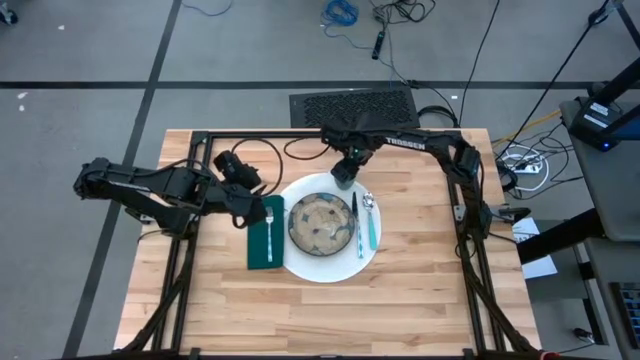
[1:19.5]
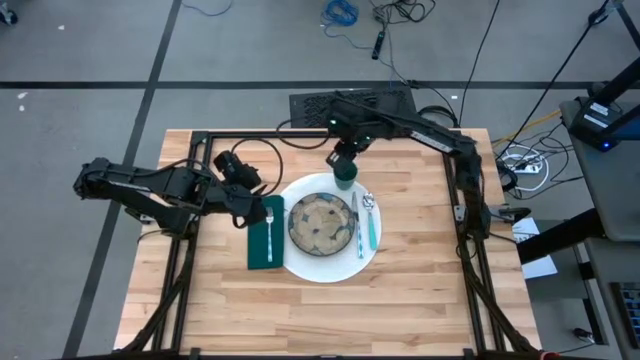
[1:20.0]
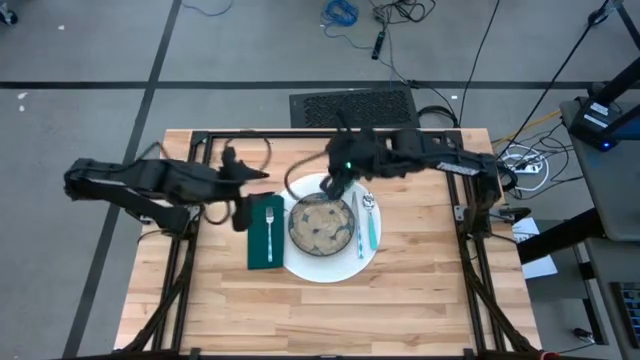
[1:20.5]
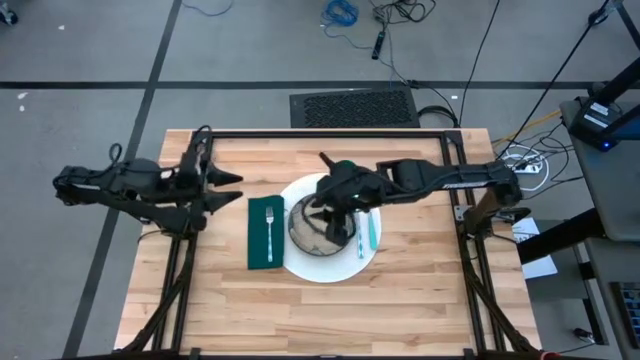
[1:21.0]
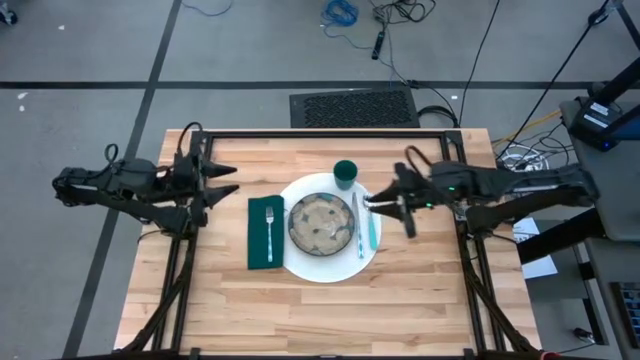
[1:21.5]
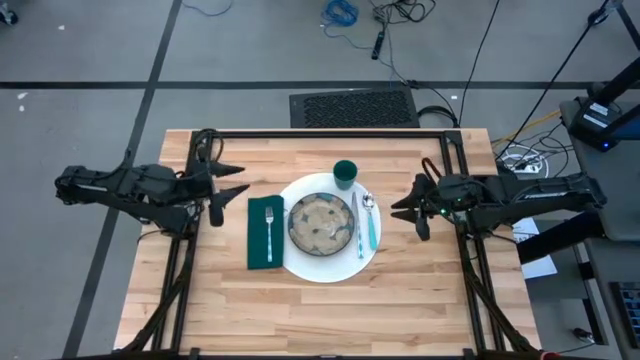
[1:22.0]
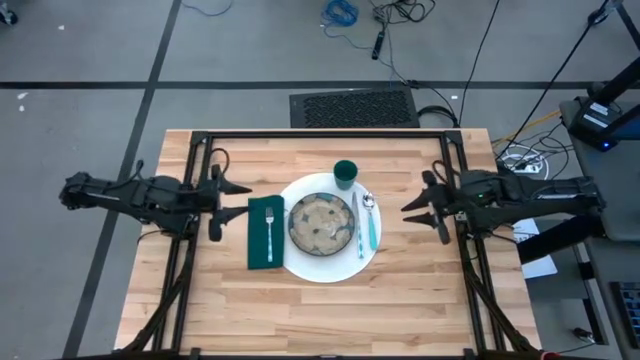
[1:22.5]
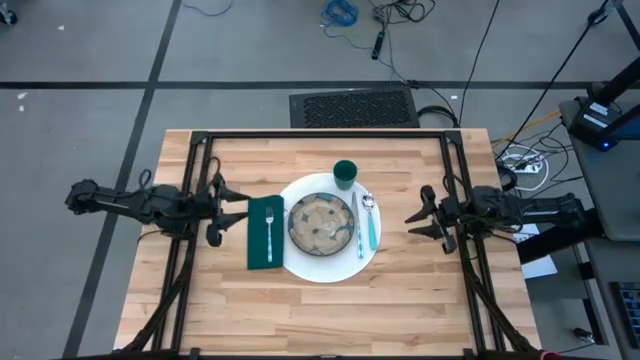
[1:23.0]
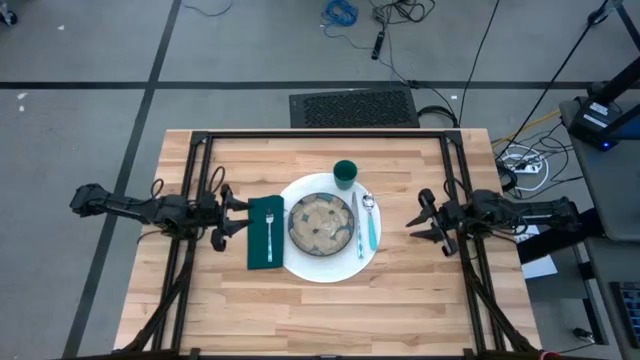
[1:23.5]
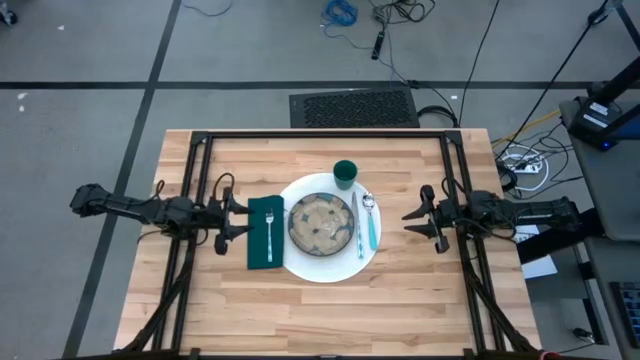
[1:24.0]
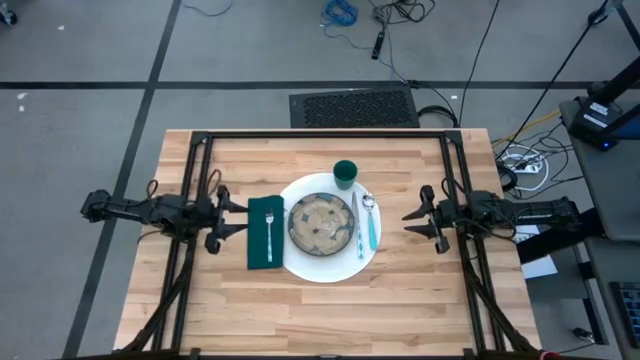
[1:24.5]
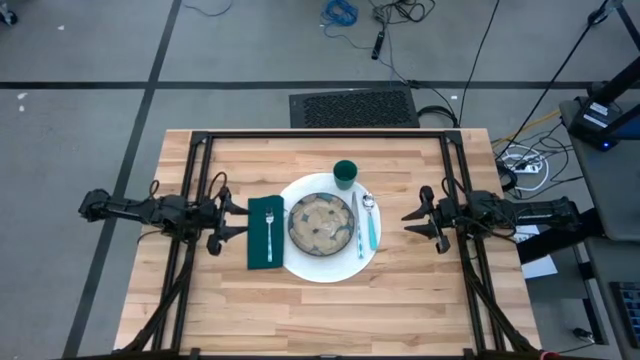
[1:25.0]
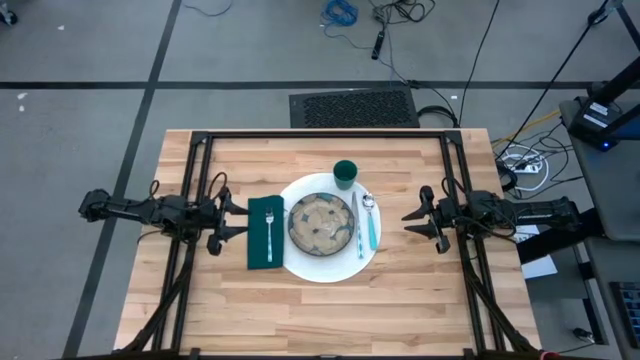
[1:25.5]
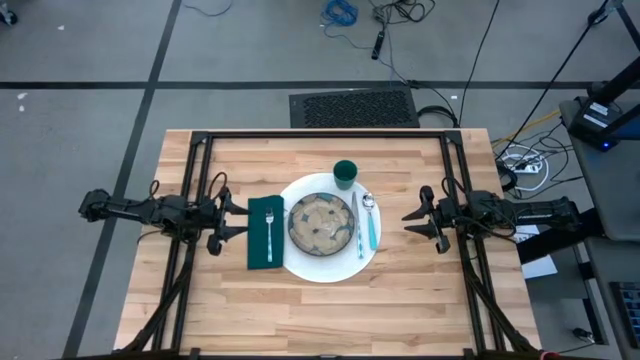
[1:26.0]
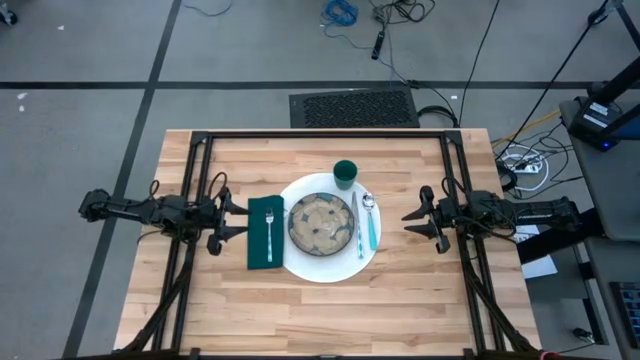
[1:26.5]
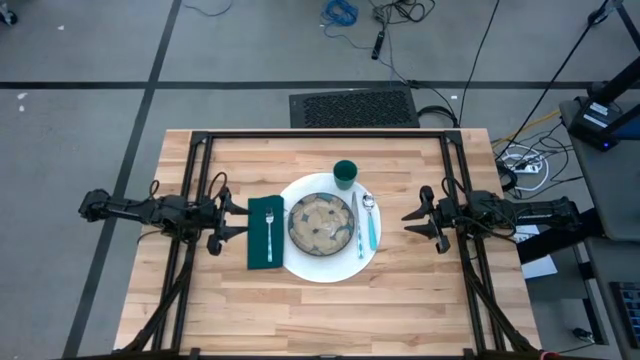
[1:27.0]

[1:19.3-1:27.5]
Task: Set table place
Return to Home Position

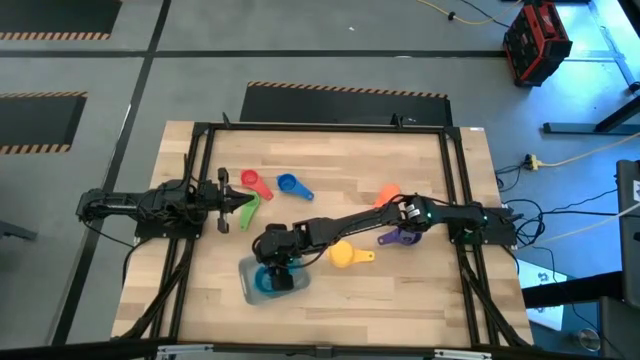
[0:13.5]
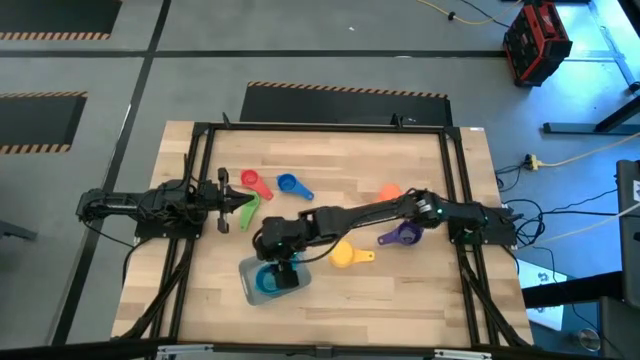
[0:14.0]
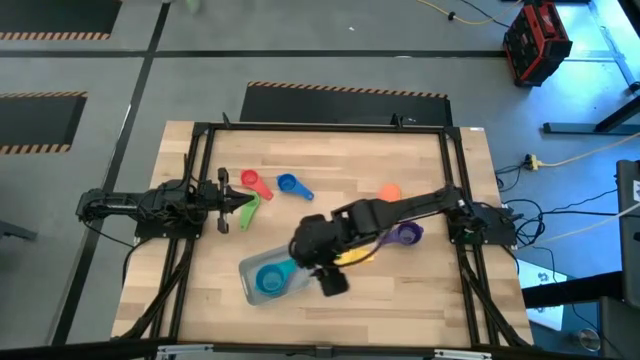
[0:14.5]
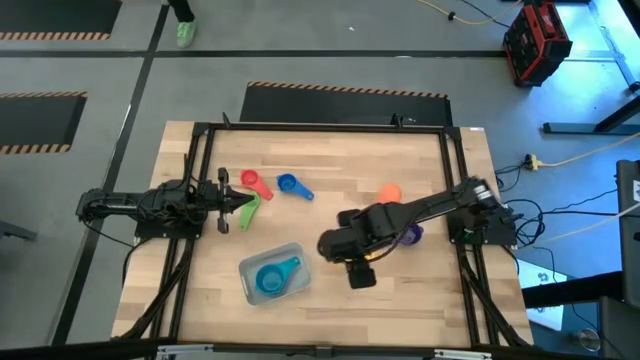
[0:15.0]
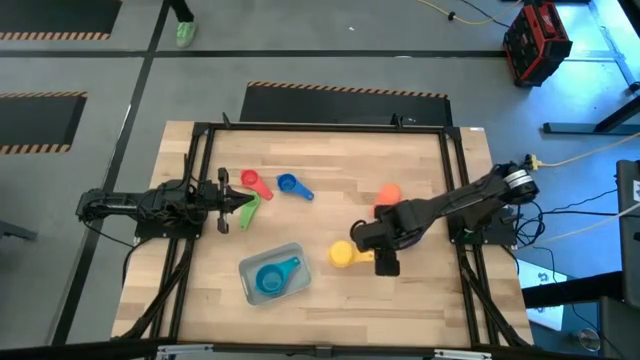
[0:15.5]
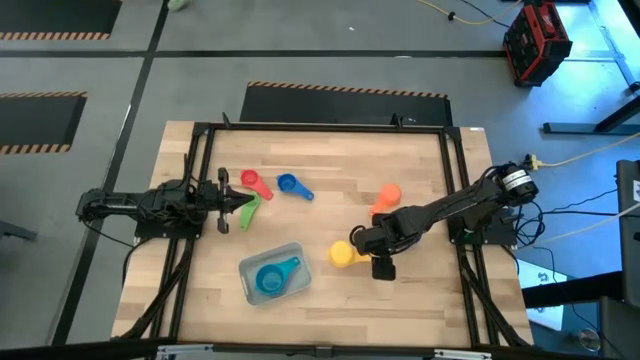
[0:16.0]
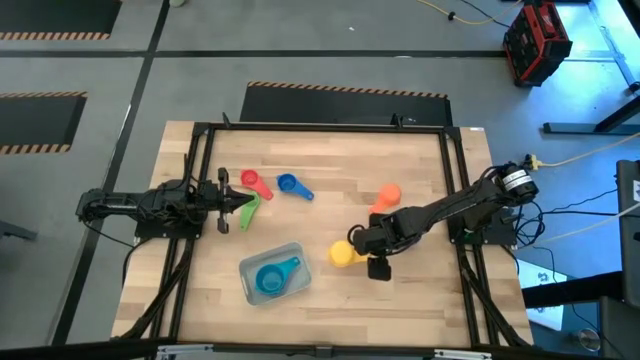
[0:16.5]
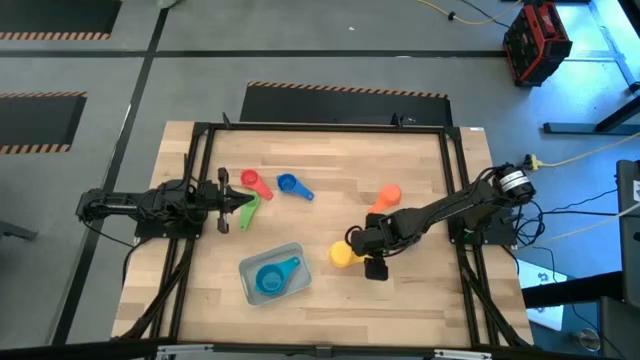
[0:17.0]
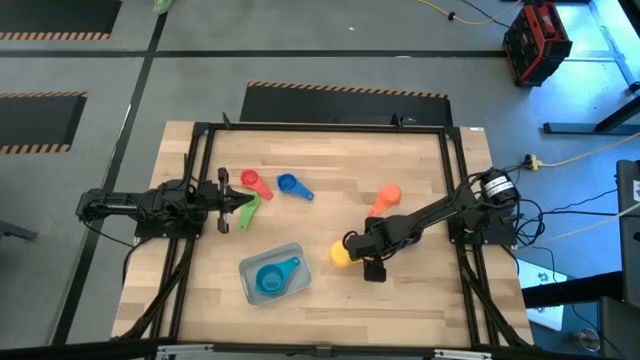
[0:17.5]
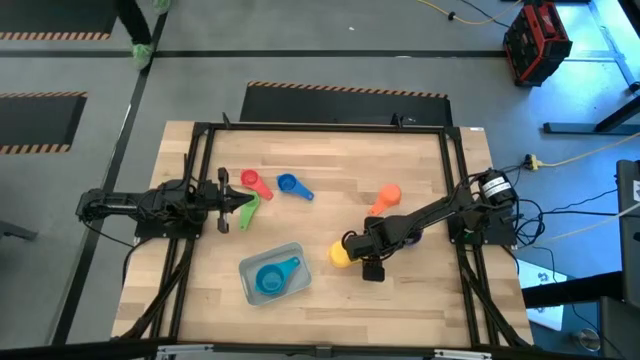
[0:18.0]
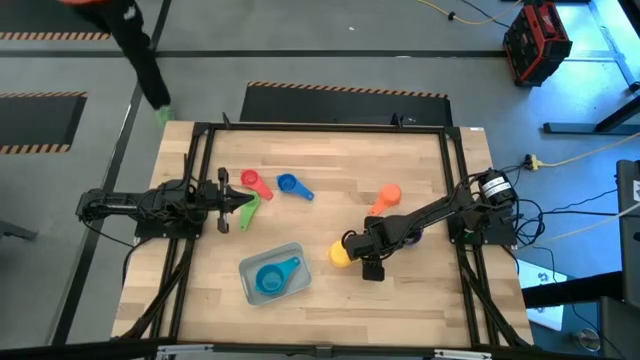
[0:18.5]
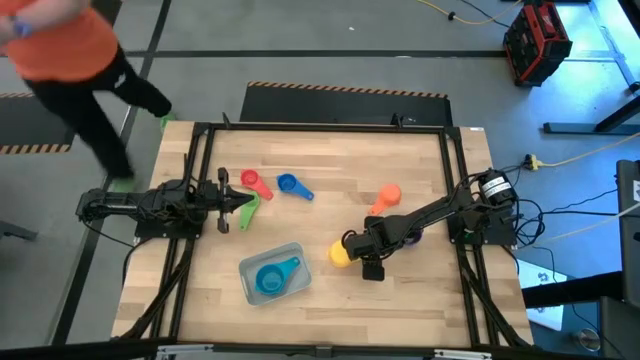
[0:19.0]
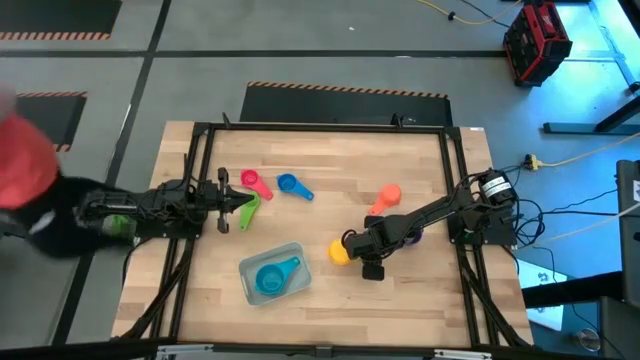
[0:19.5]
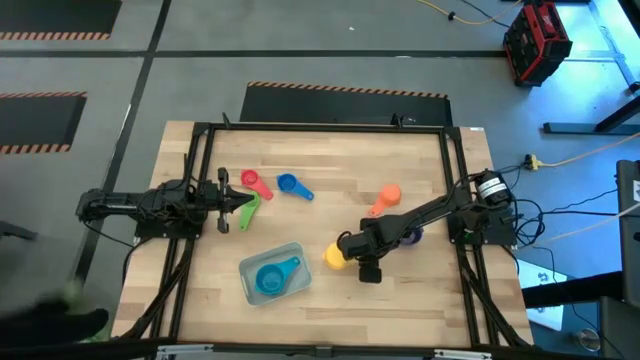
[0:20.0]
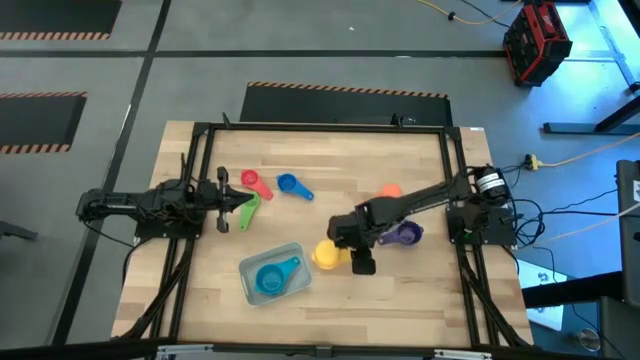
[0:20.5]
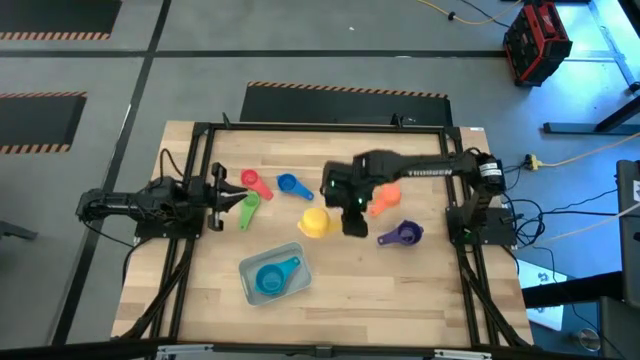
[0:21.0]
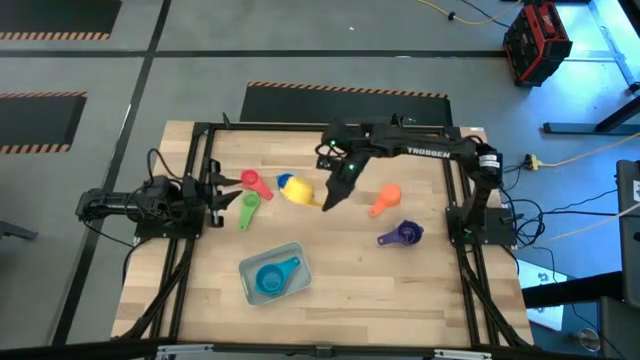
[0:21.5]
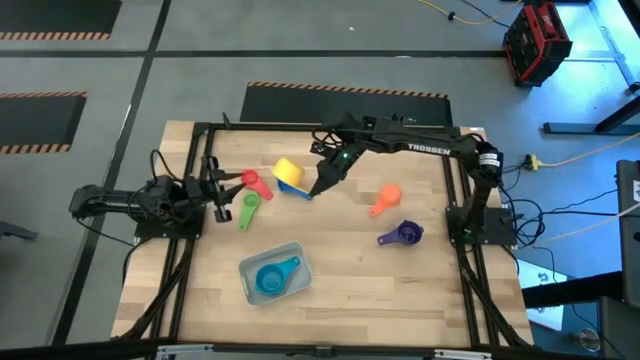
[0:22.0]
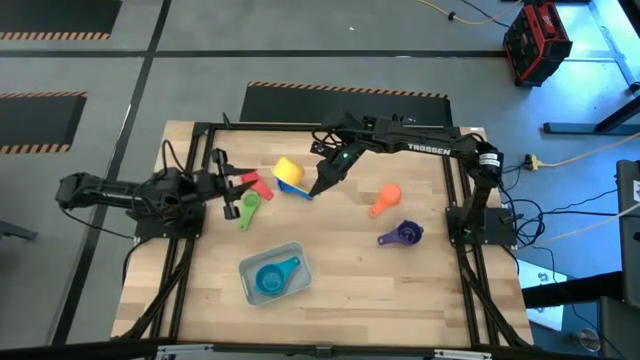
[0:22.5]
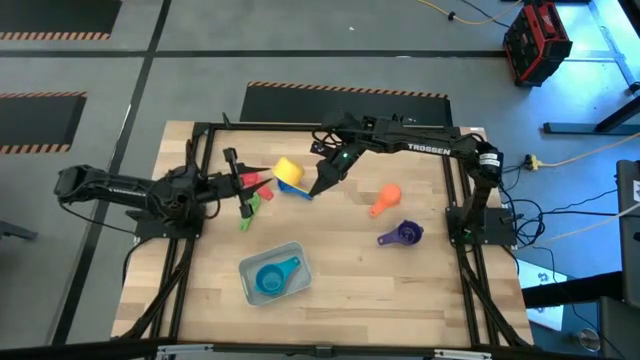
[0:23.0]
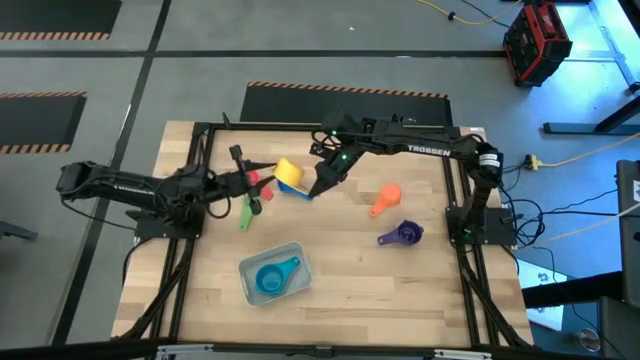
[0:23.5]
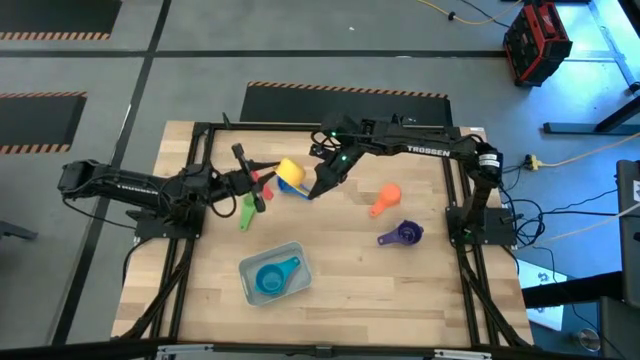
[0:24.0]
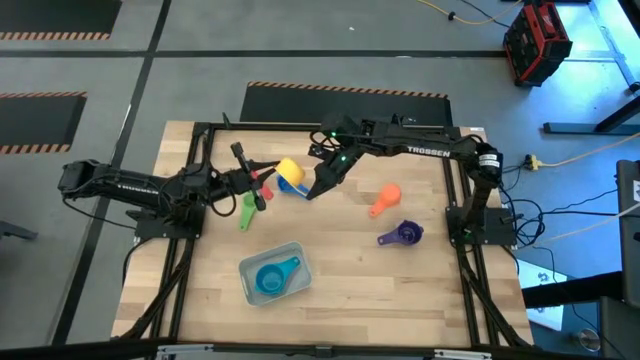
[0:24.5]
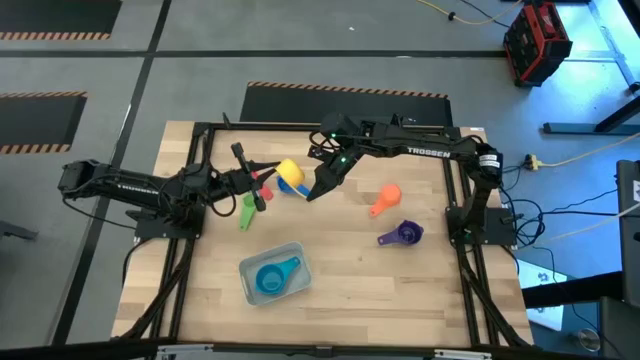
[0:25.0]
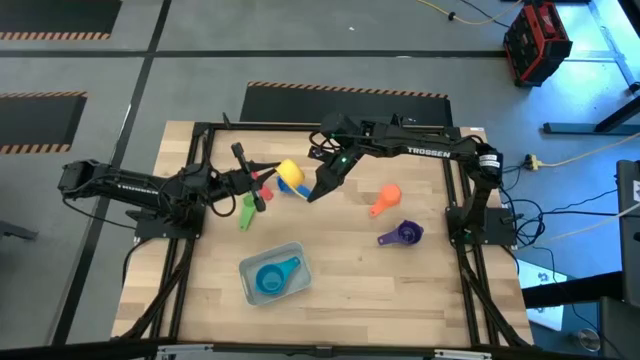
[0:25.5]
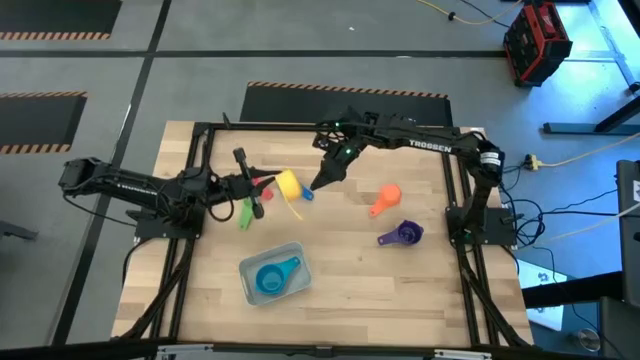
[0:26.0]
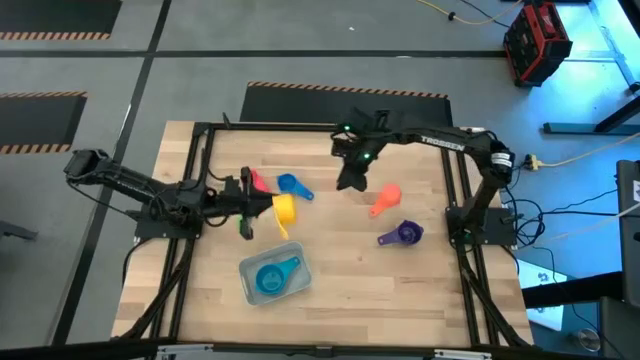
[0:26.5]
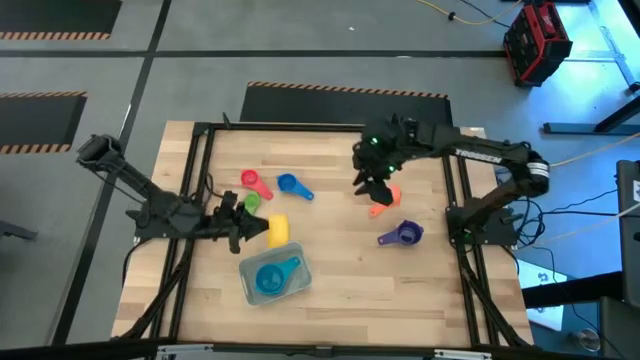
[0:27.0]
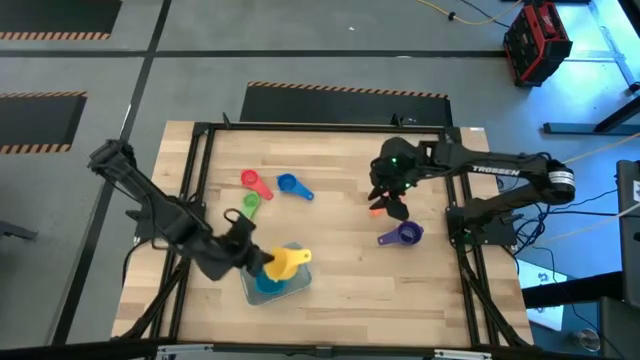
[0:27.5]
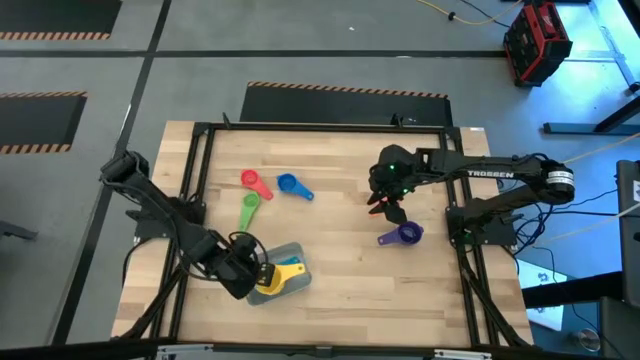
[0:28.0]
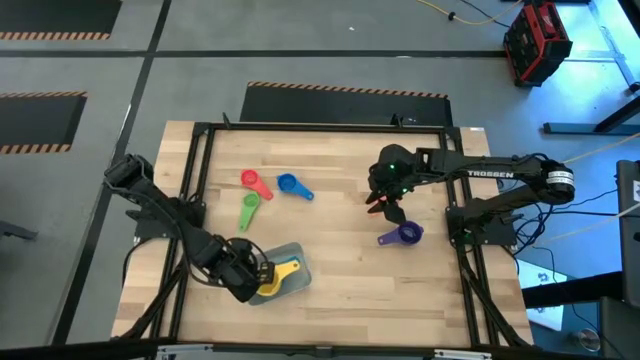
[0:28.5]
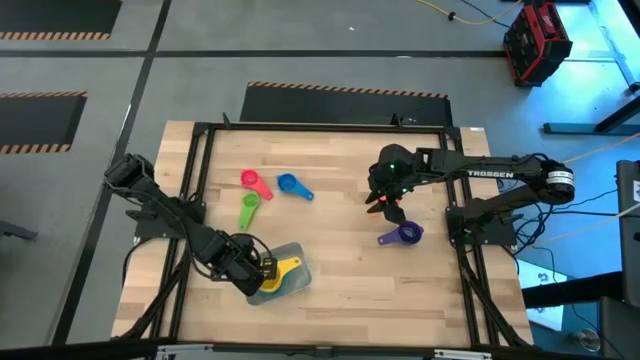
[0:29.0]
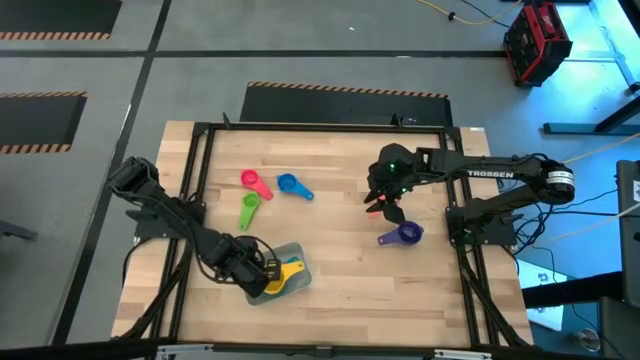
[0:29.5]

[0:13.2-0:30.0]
Task: Nest measuring cups in basket
Stack the yellow measuring cup into the light blue measuring cup in the grey bin
